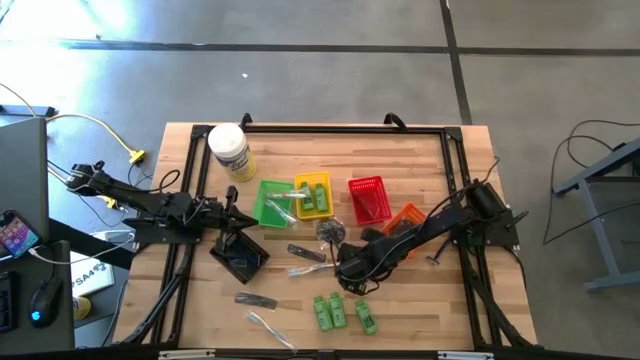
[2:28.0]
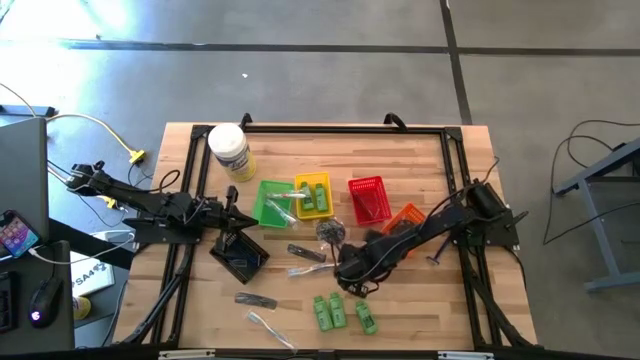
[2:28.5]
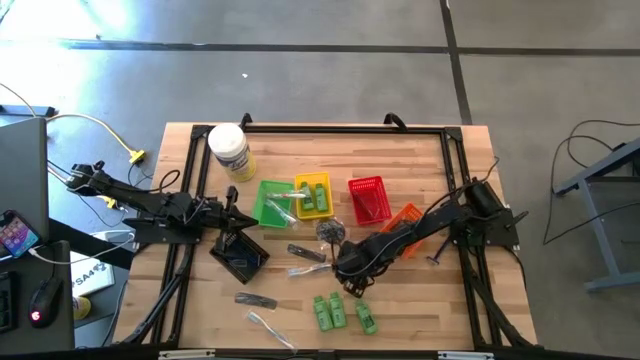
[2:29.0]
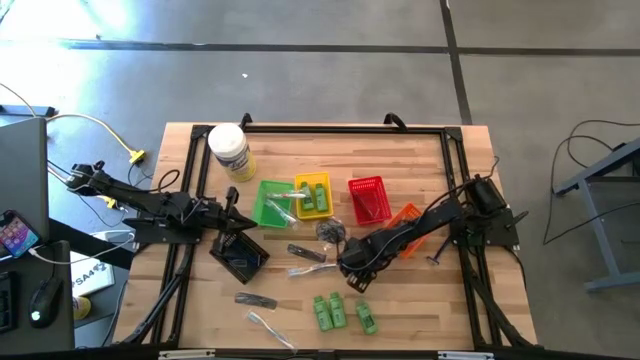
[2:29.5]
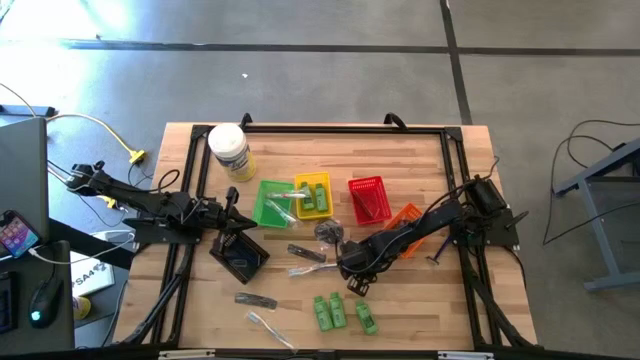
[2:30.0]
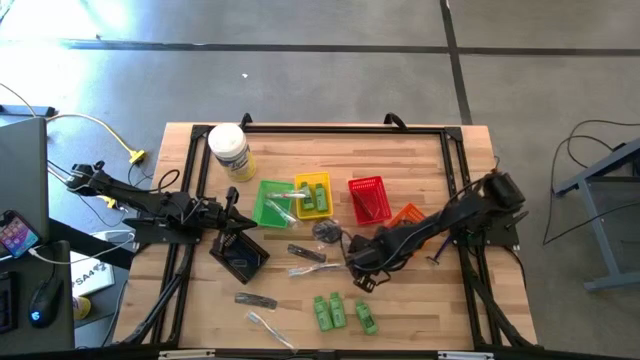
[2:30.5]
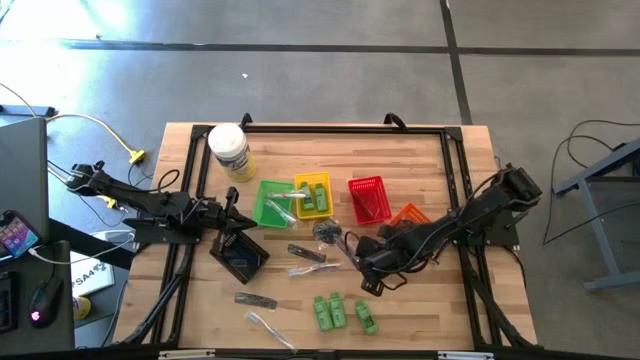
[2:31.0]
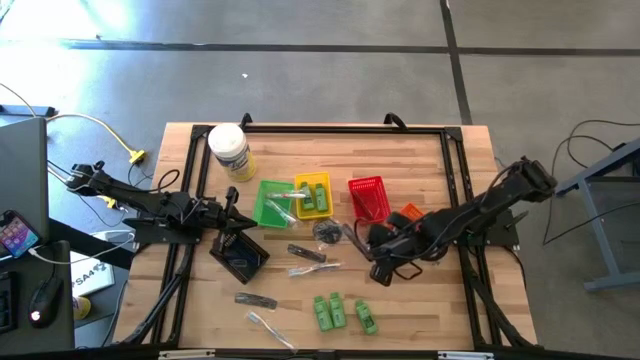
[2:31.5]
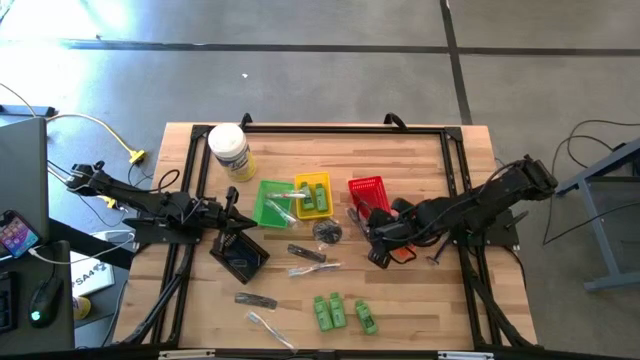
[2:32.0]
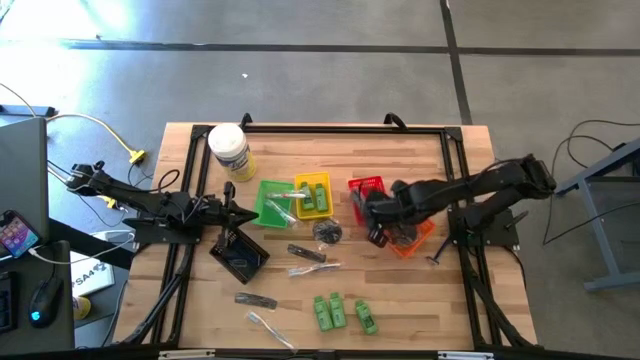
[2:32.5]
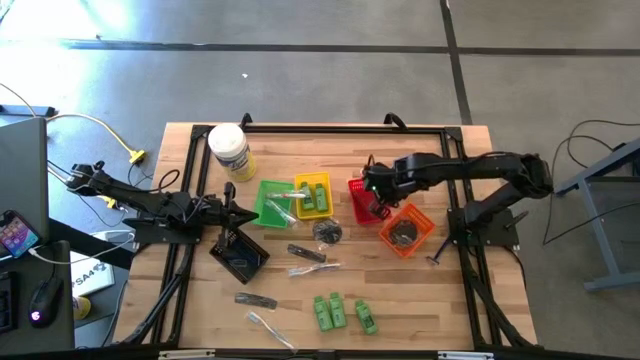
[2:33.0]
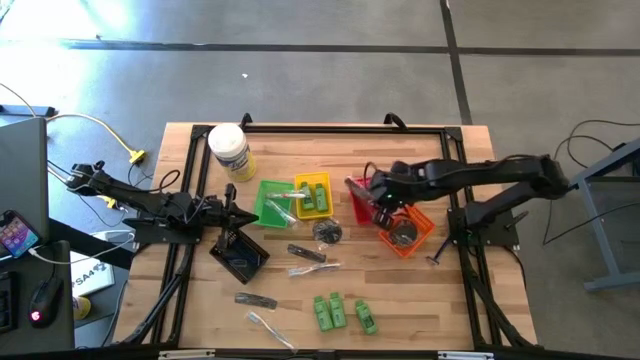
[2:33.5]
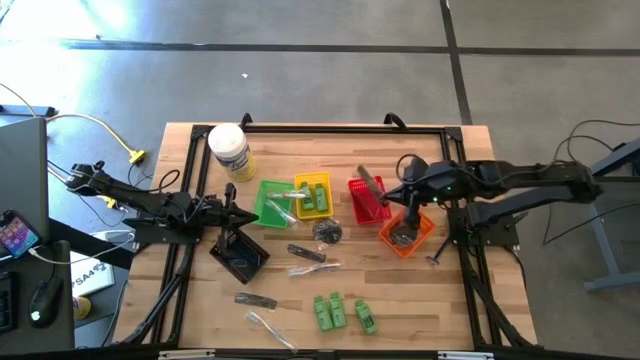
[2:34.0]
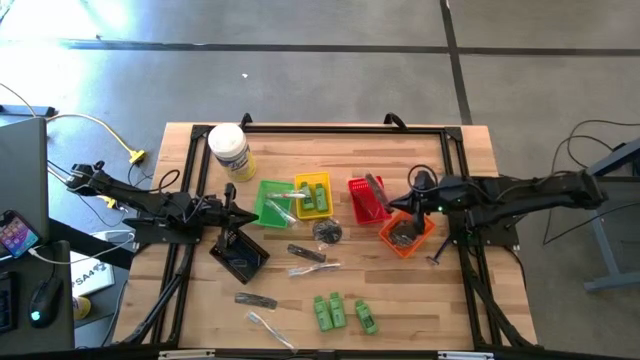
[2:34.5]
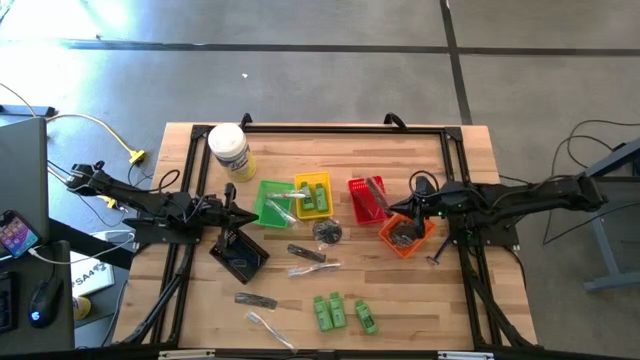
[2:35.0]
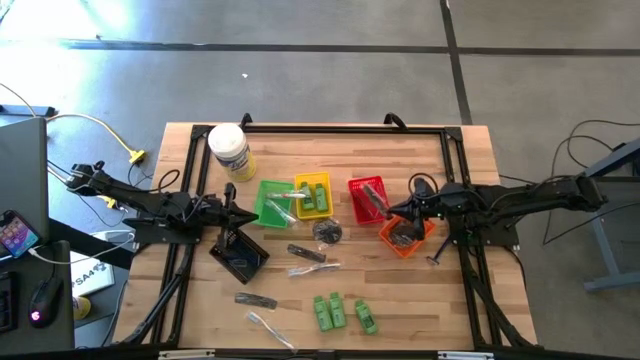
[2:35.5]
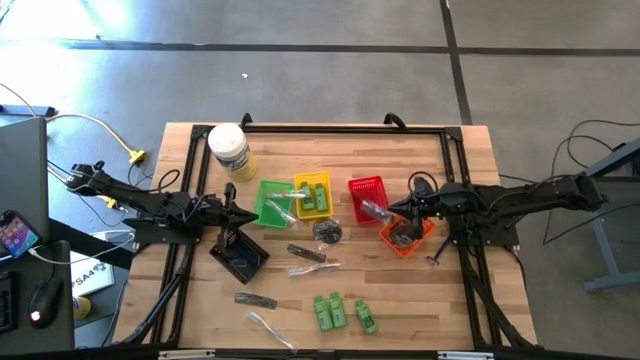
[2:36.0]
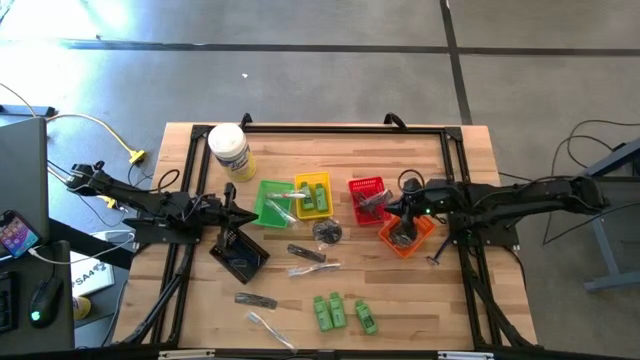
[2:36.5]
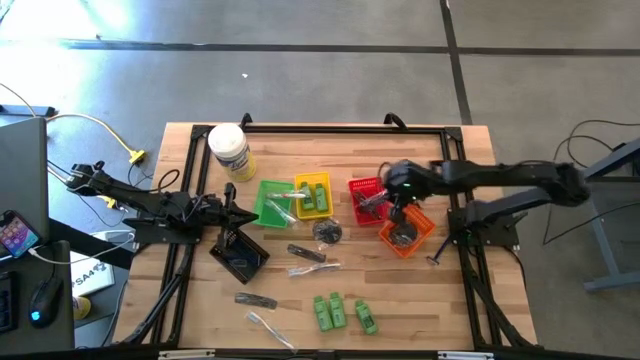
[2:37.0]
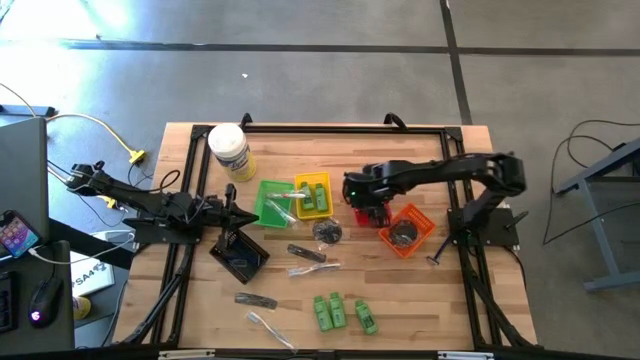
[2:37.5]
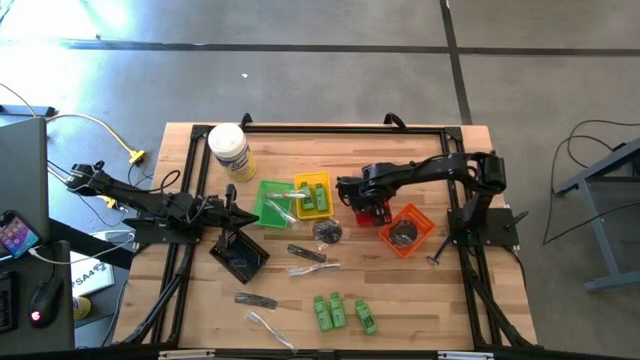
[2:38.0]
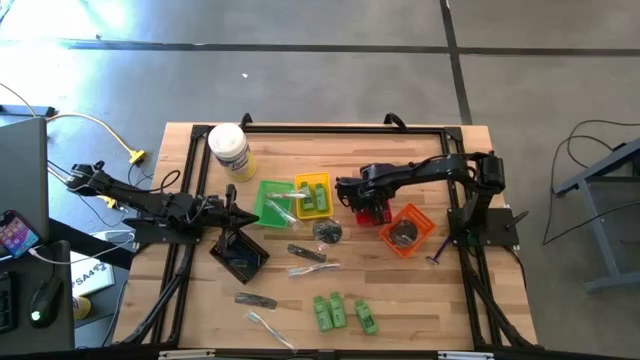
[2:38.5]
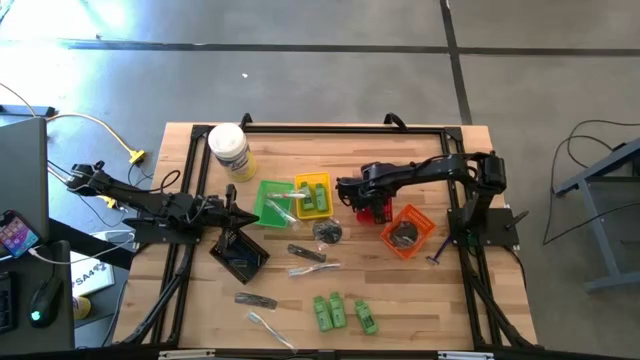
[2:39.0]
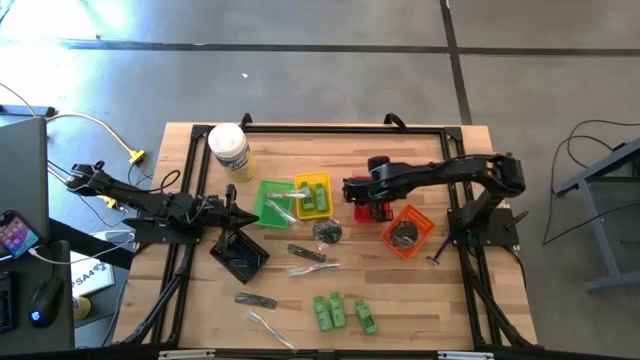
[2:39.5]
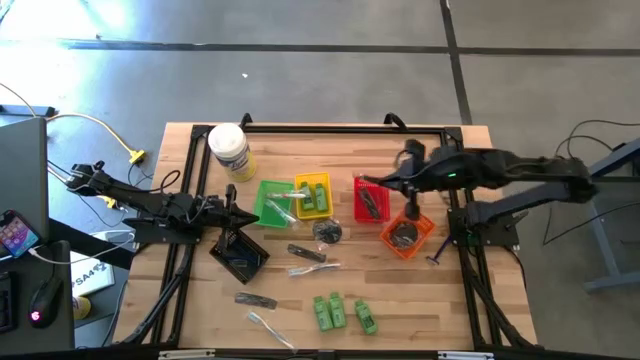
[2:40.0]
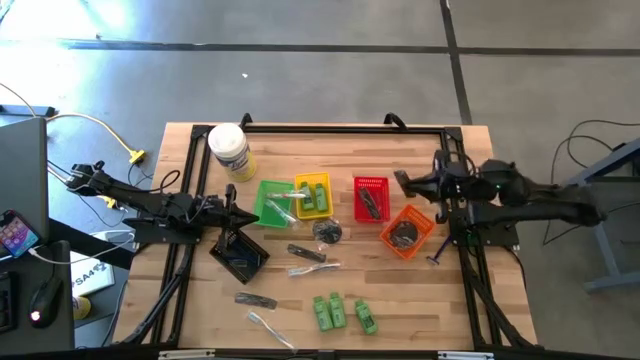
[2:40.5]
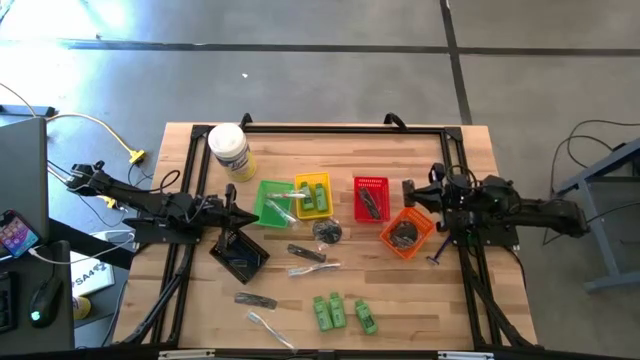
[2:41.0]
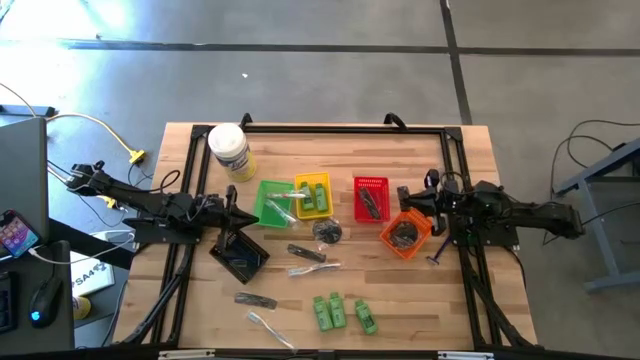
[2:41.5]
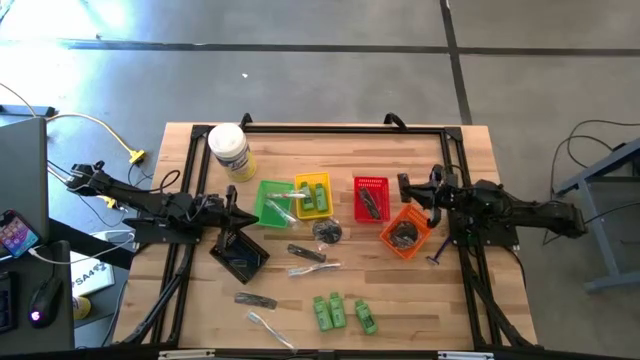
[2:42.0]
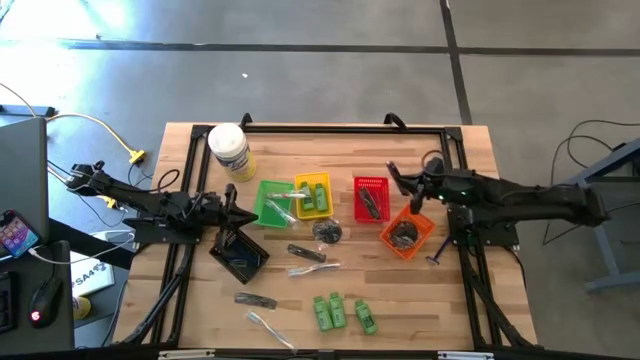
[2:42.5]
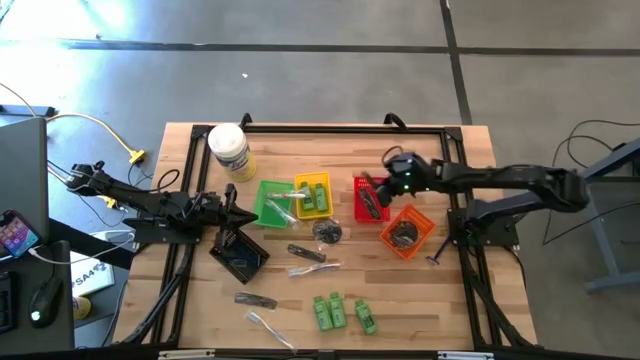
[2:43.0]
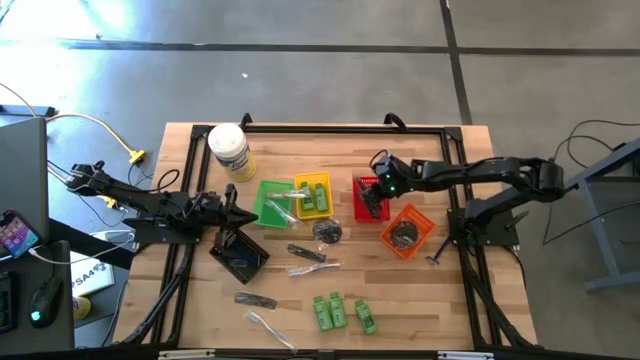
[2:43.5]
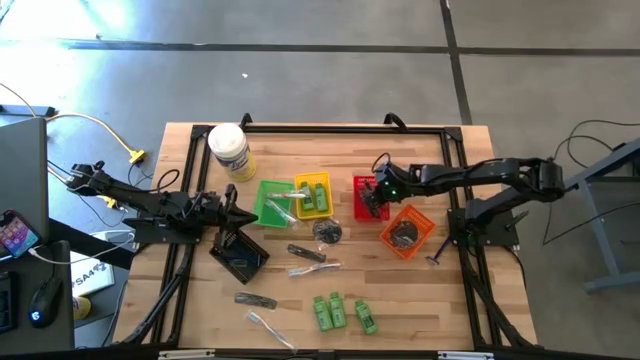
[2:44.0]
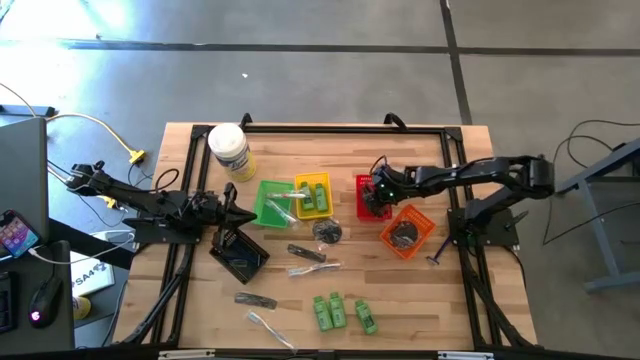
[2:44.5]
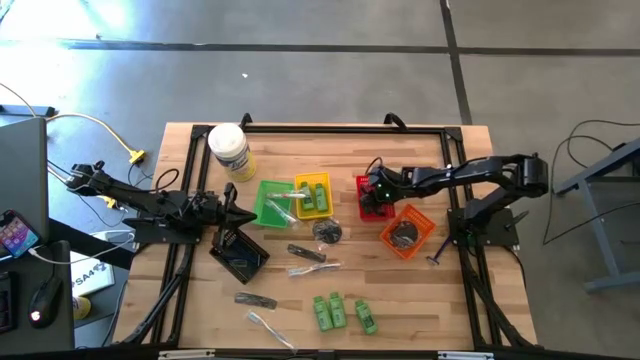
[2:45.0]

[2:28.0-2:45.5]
Task: Pick & Place Travel size toiletries
Put the top right black comb into the red basket

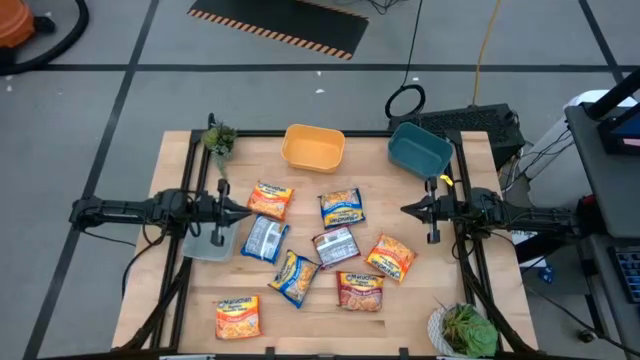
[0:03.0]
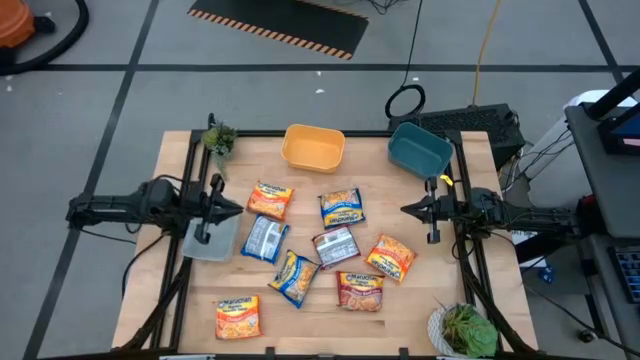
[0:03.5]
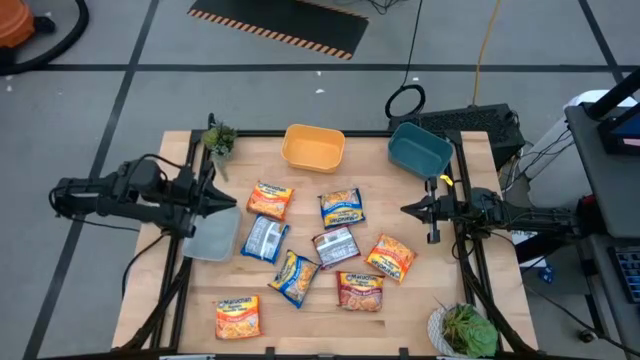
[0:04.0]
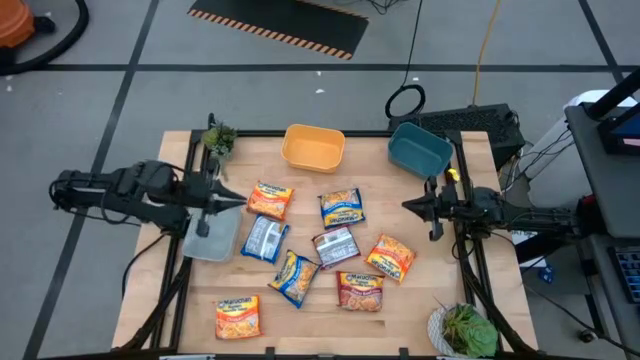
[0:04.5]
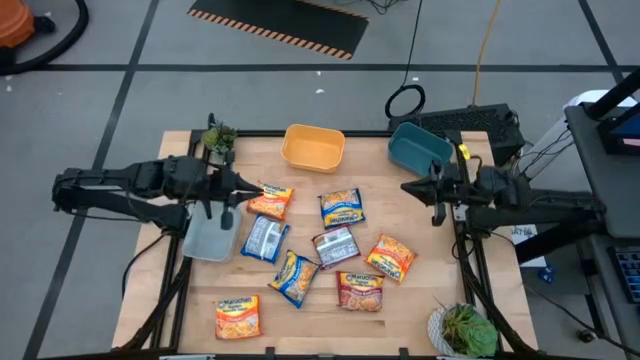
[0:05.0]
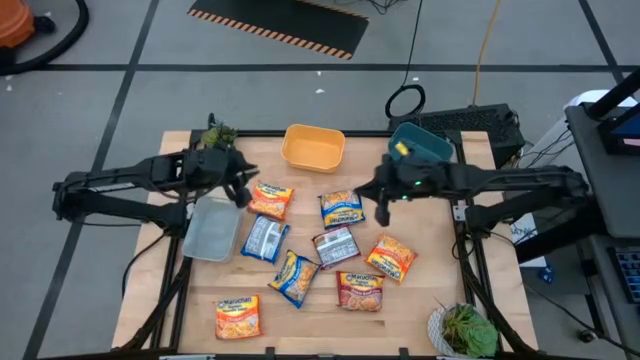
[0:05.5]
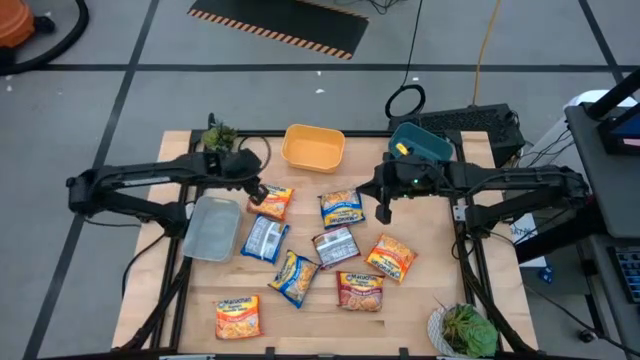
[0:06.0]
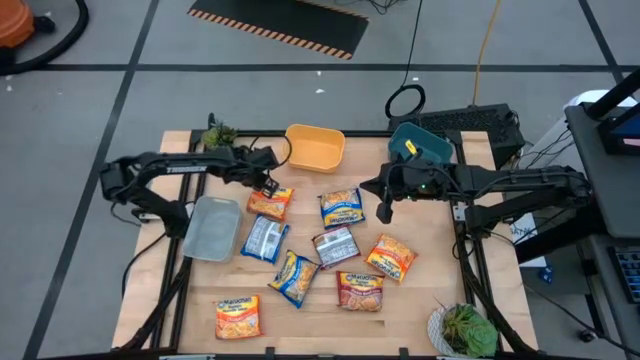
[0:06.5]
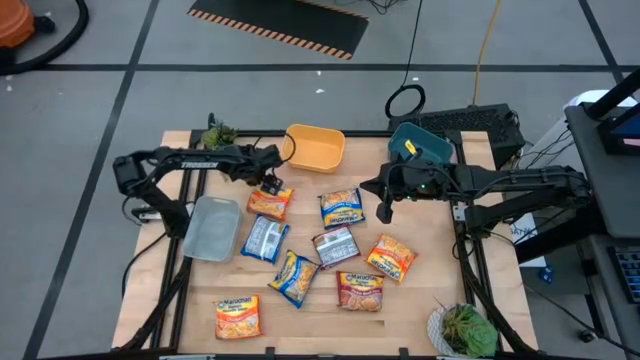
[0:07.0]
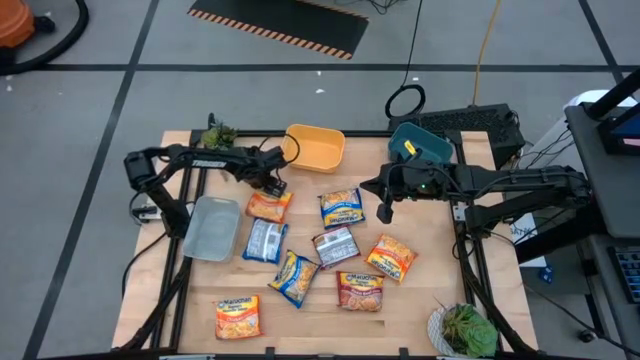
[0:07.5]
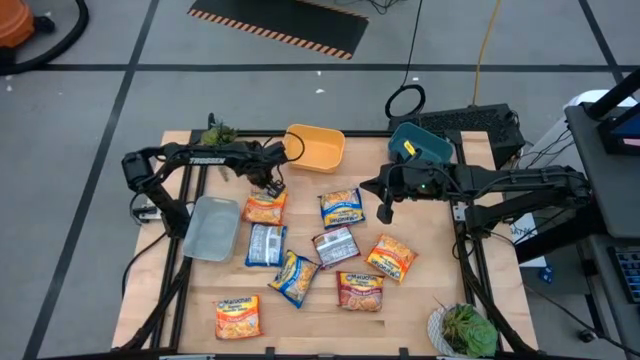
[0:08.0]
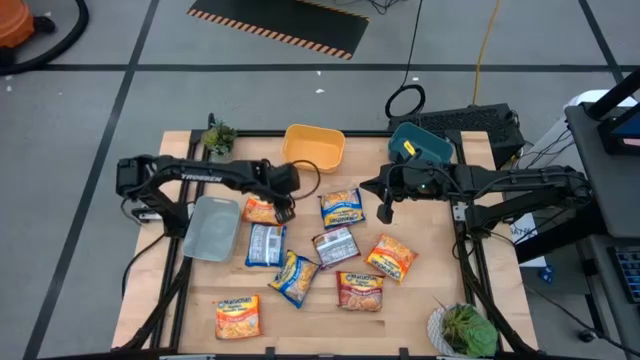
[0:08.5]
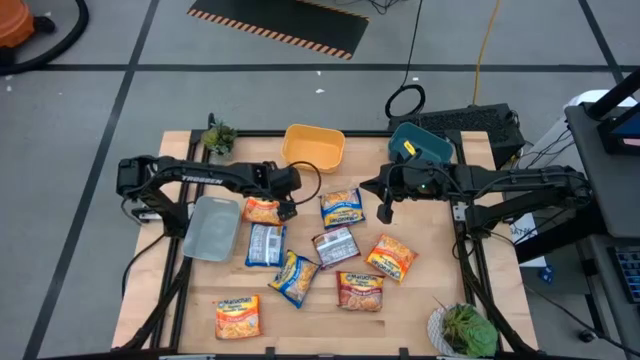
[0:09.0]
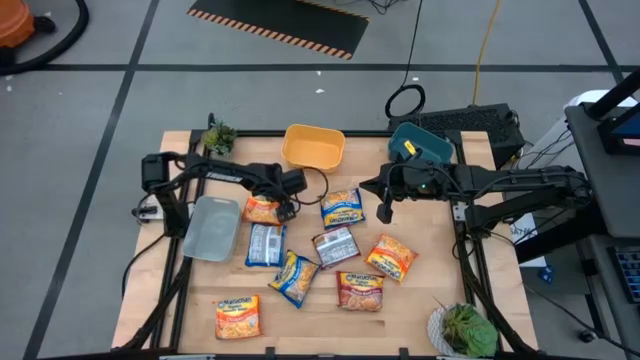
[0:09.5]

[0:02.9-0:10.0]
Task: Sort Maruchan noodles
Put the top left orange bag into the yellow bin
